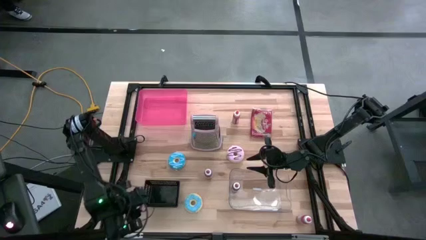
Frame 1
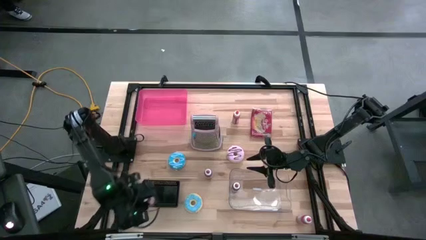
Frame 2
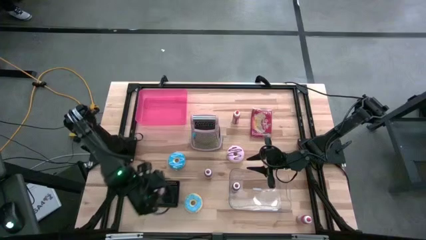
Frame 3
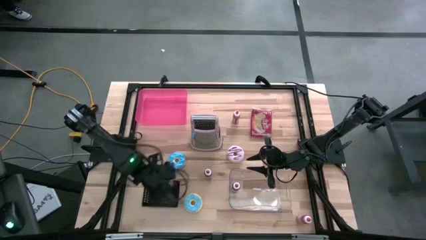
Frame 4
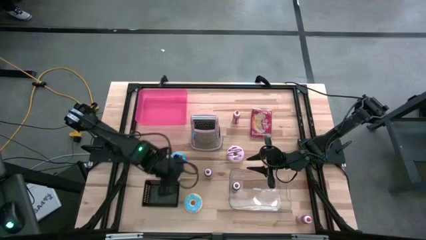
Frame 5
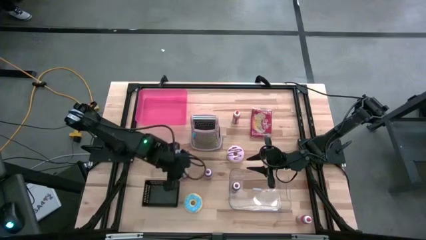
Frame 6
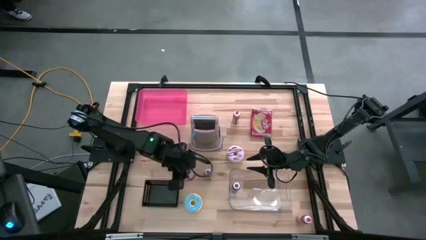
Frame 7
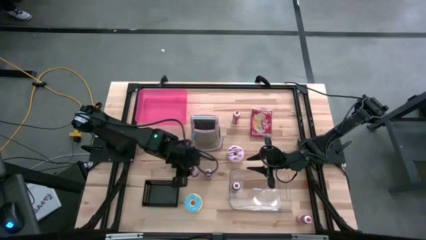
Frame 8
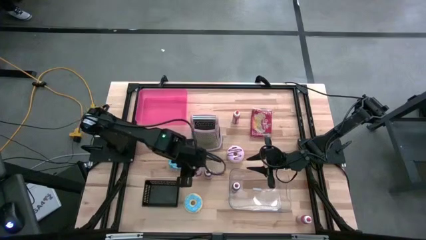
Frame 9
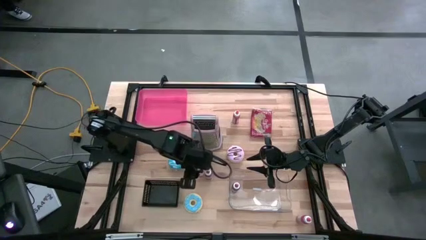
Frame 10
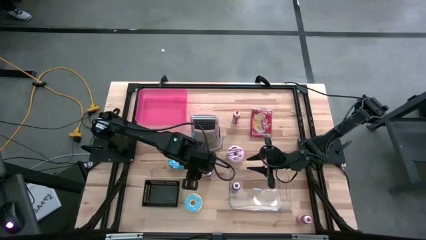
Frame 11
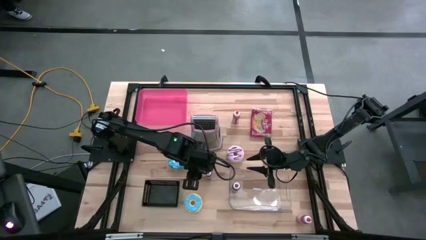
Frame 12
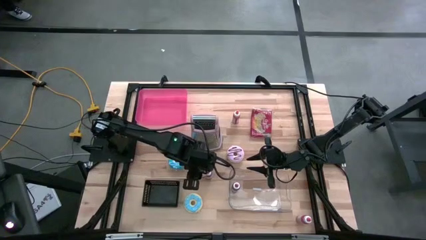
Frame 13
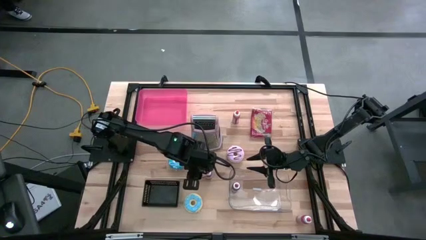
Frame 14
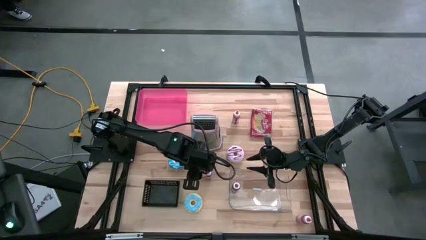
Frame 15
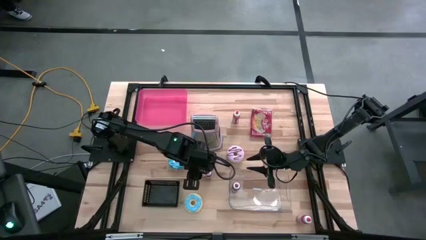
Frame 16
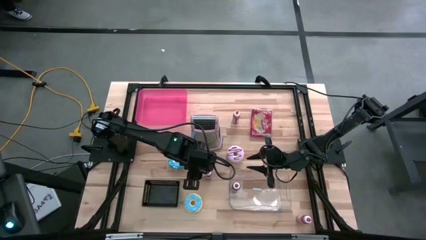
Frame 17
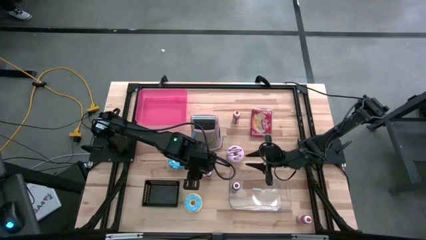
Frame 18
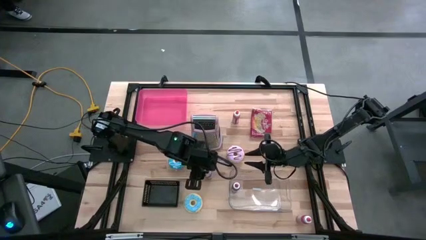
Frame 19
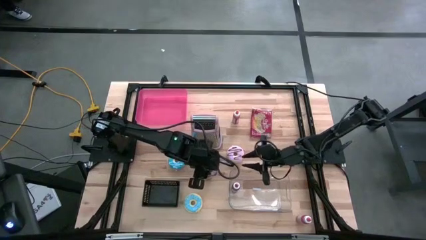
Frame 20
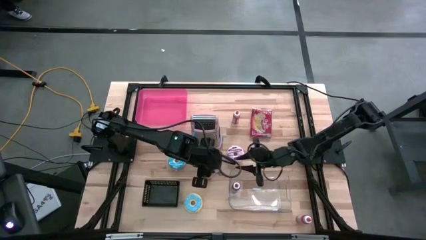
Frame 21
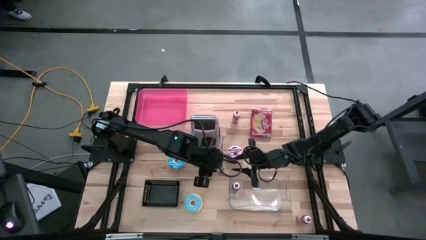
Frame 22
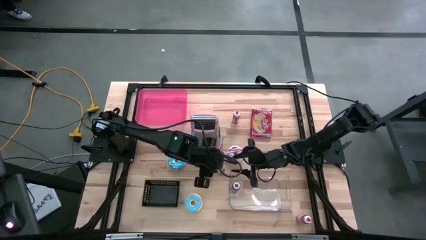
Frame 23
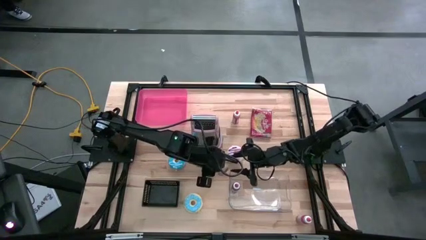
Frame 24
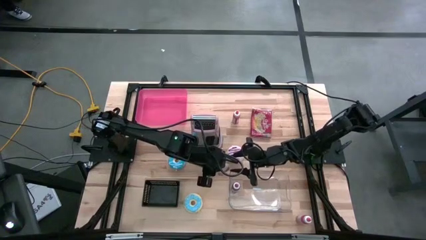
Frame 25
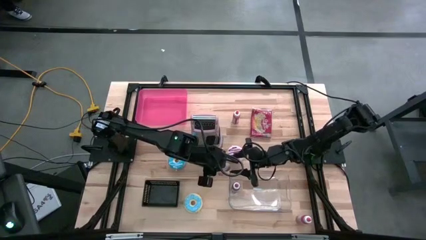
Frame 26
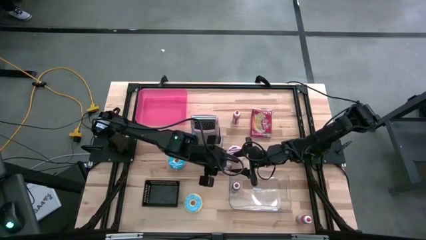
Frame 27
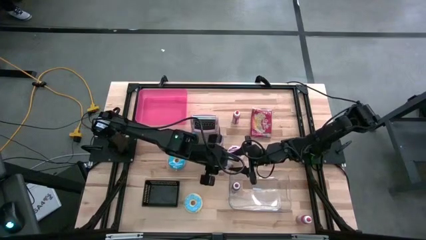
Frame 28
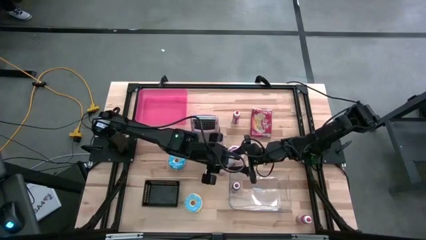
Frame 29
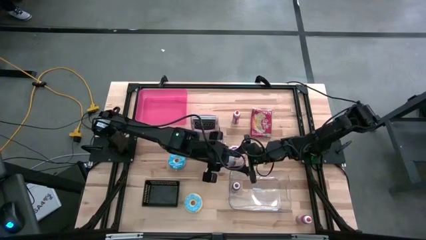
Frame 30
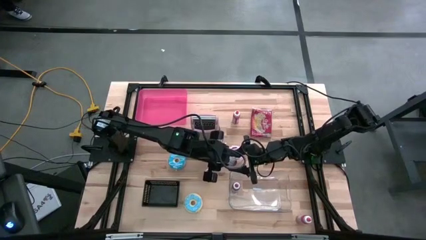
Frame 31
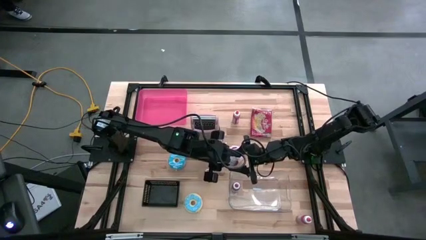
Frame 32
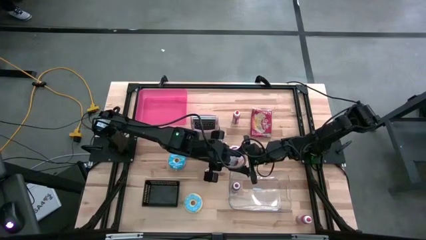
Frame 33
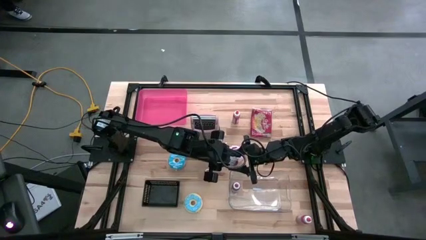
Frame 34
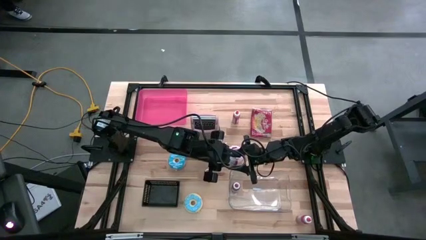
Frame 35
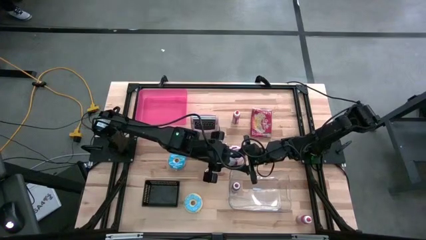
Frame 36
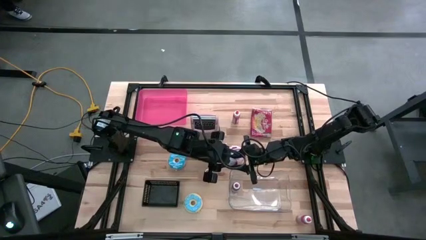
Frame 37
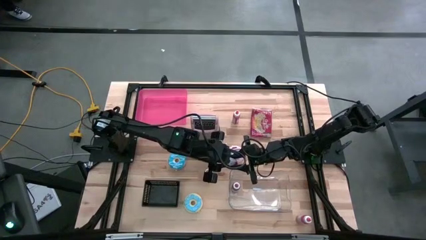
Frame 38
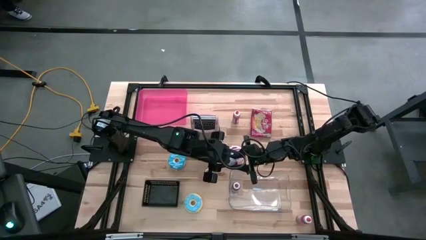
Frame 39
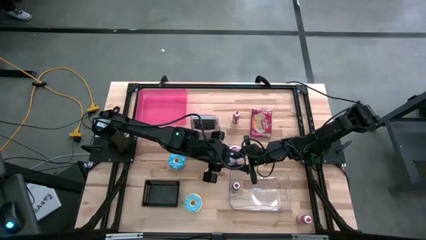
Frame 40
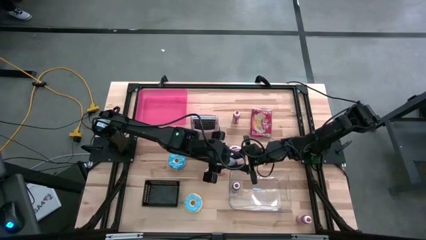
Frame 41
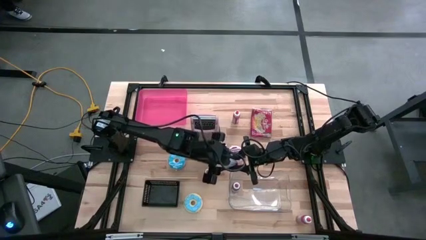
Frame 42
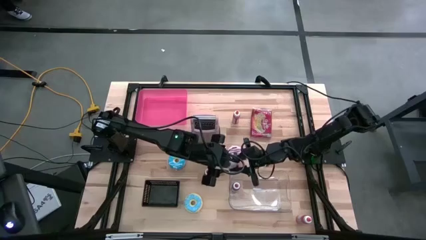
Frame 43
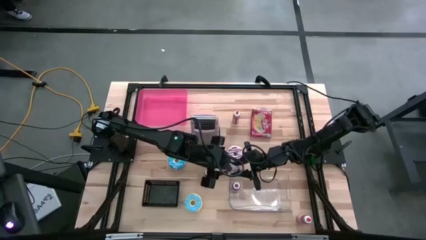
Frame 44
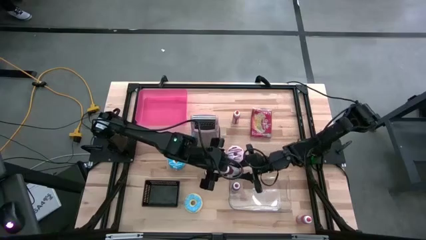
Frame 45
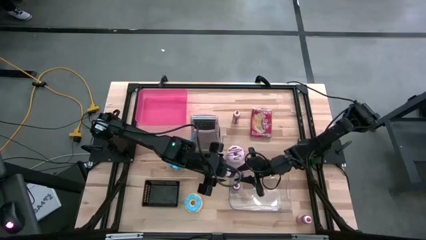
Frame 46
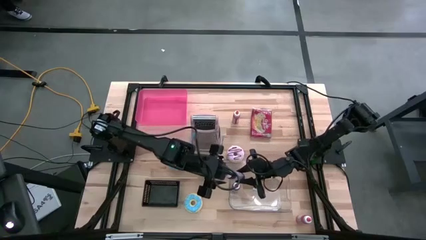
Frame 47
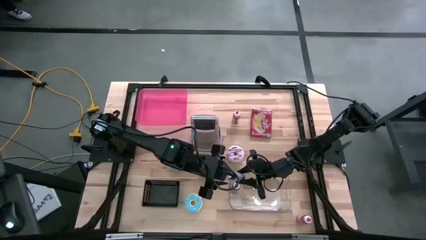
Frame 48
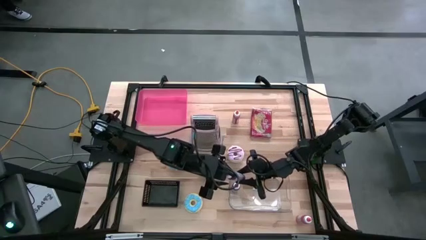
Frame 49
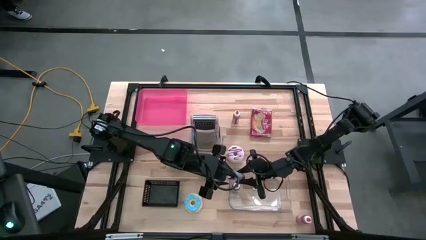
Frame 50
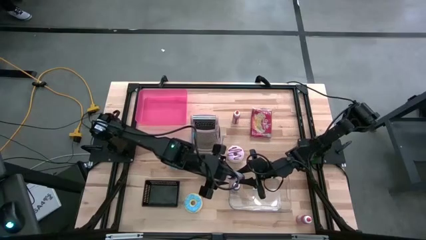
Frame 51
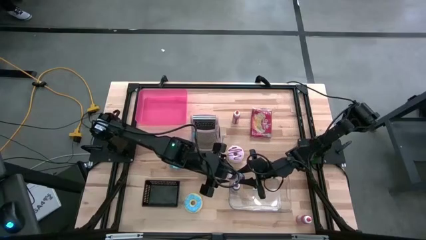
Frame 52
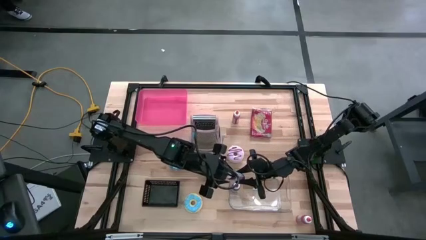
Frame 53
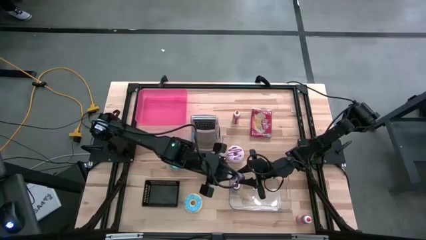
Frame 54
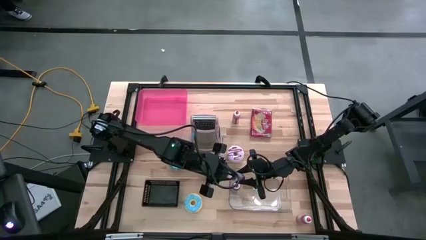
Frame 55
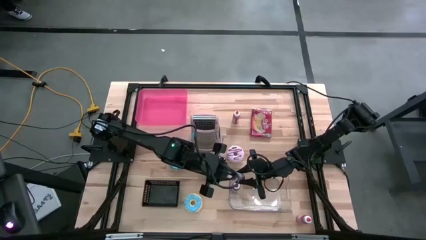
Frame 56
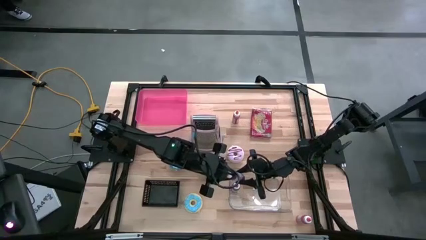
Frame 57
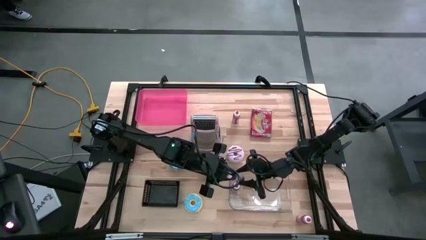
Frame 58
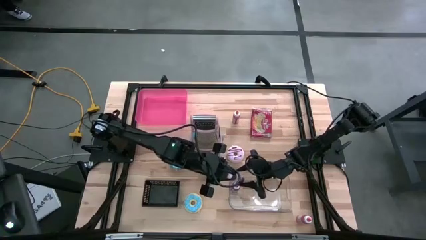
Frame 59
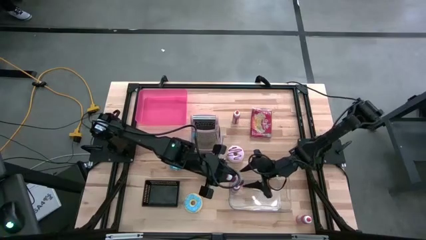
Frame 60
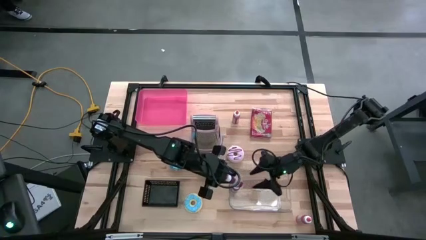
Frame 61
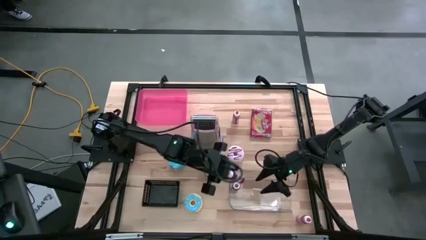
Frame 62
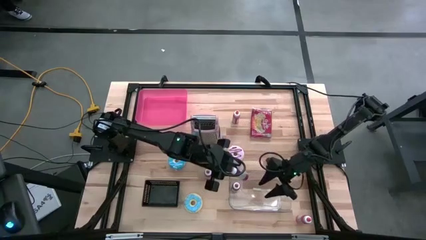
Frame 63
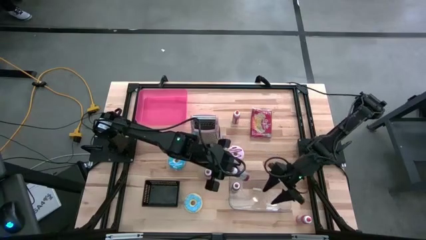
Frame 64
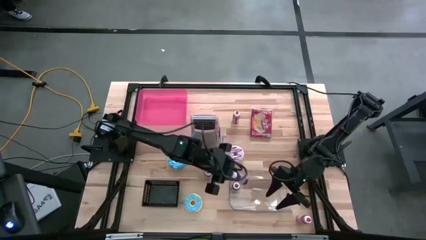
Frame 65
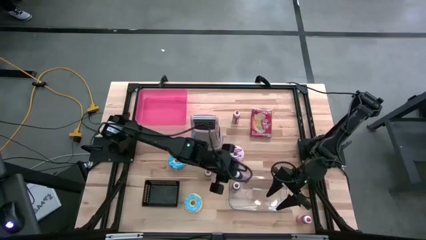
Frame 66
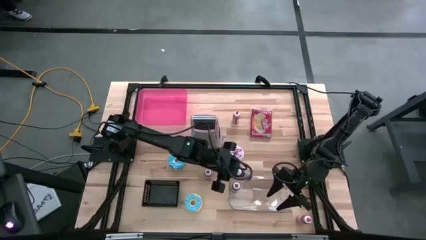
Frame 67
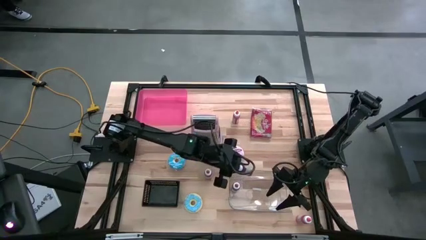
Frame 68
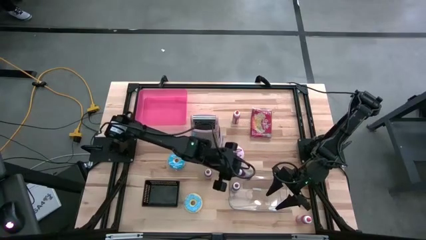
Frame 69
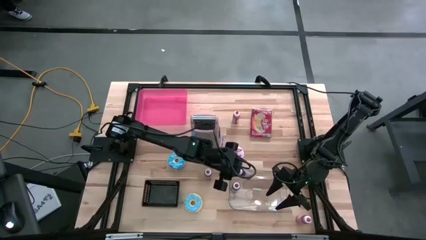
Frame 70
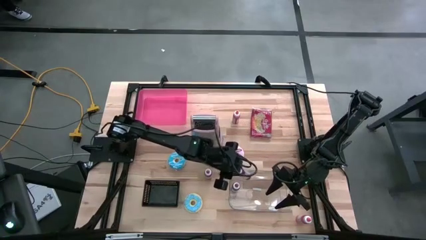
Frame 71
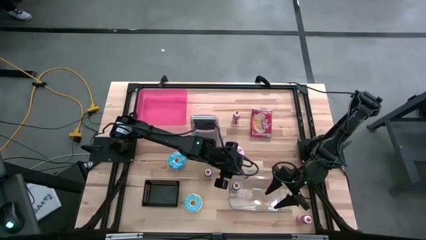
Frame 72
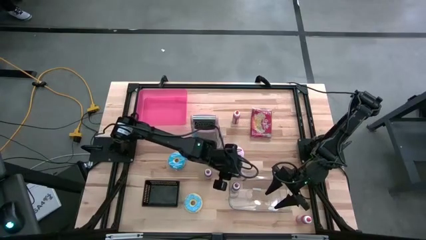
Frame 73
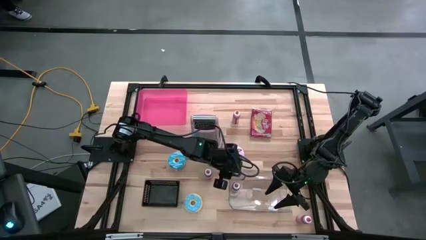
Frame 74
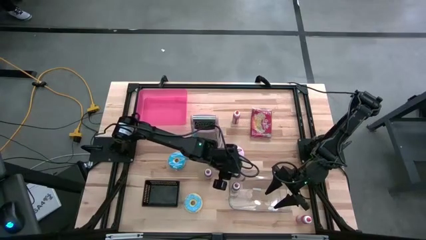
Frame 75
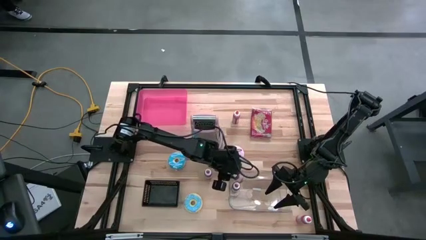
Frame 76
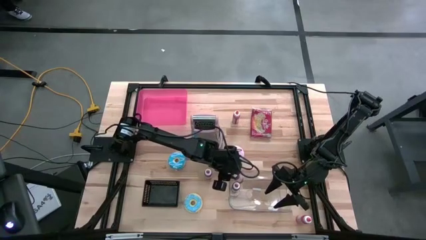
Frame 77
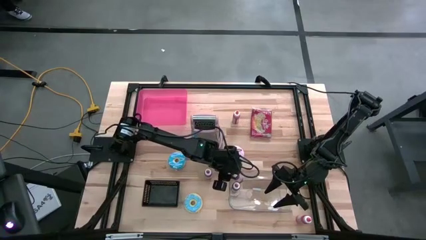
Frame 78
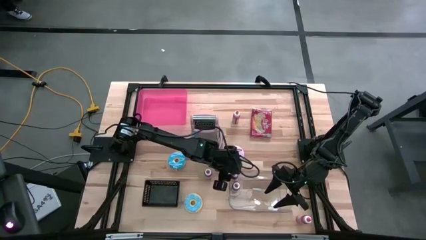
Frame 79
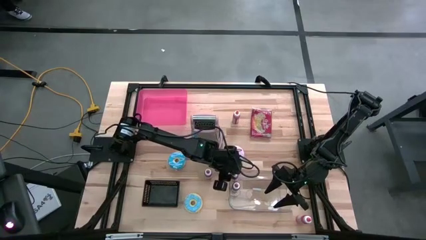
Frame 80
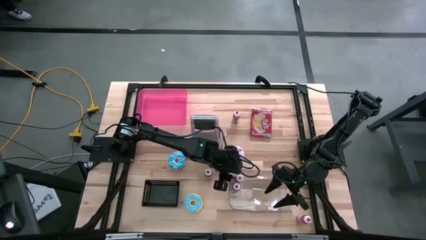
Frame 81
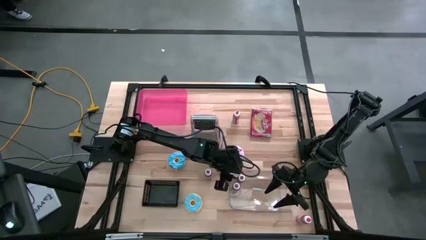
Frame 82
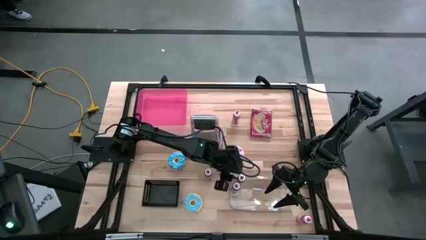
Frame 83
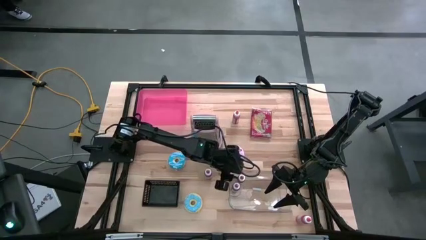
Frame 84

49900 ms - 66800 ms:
Task: Pick & Place Food Item
Put the left red food coloring bottle into the transparent bin
